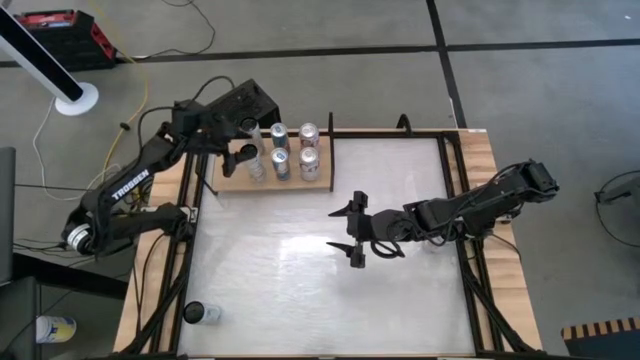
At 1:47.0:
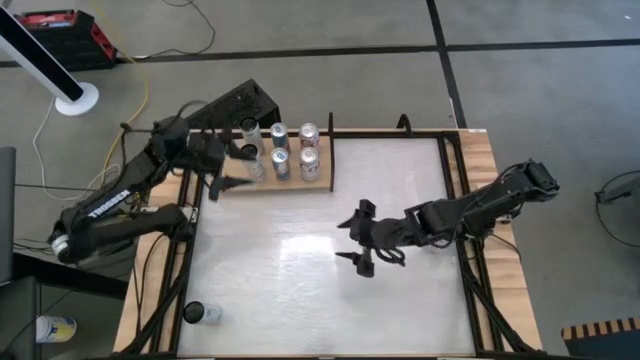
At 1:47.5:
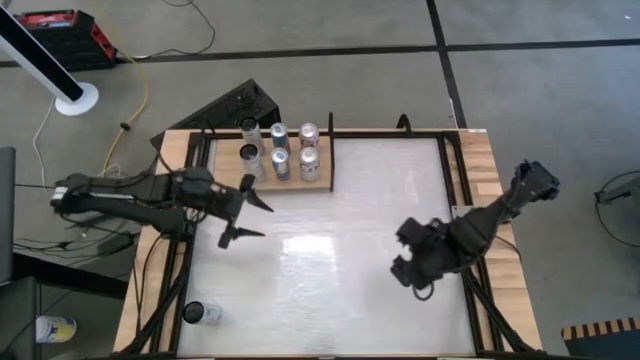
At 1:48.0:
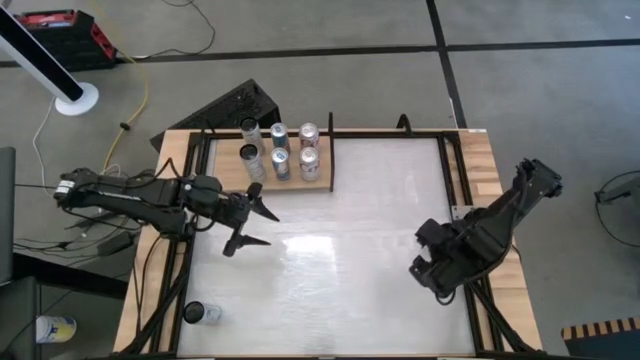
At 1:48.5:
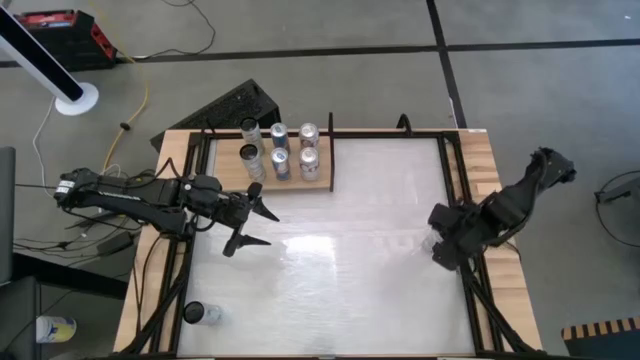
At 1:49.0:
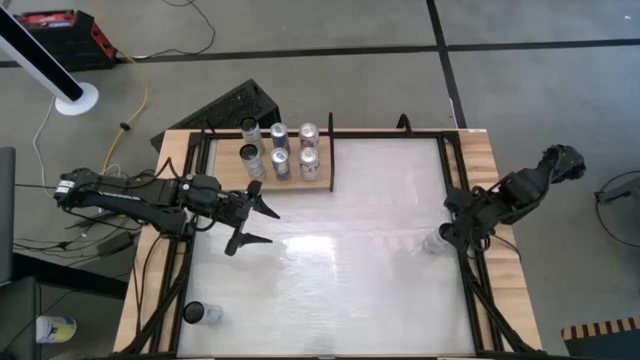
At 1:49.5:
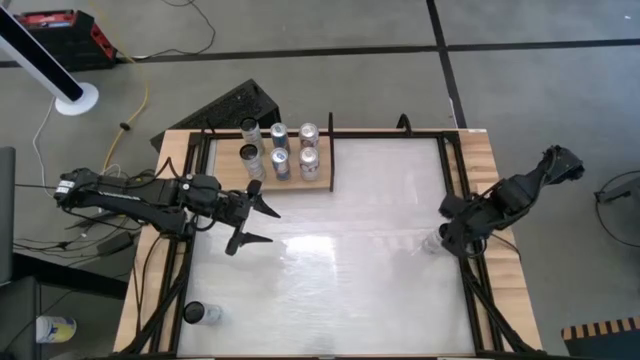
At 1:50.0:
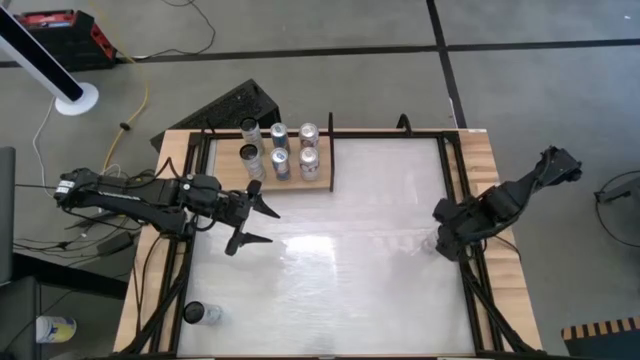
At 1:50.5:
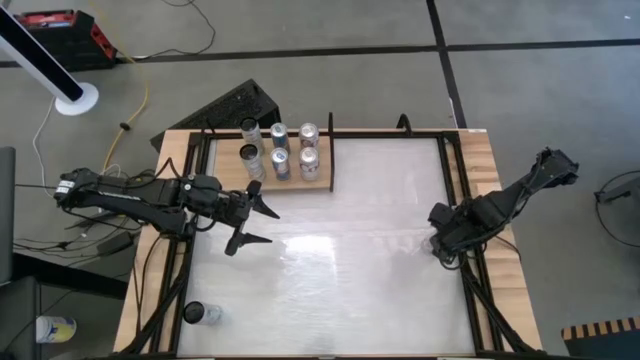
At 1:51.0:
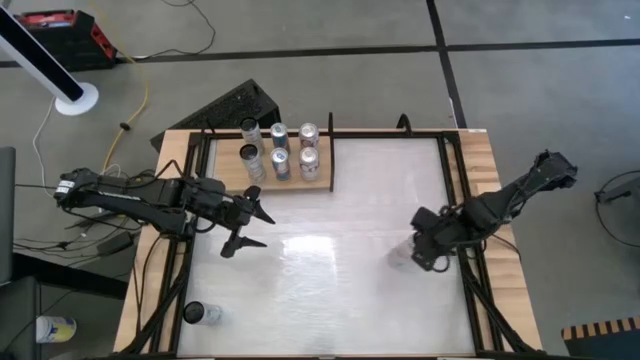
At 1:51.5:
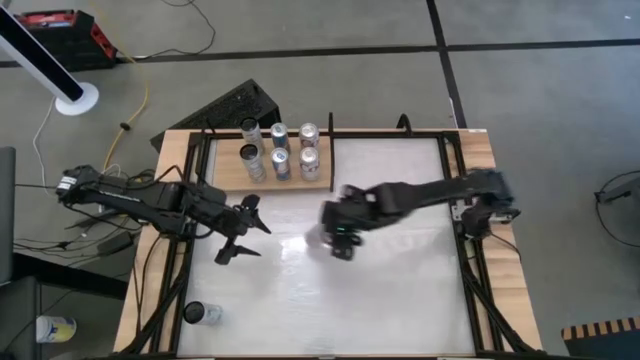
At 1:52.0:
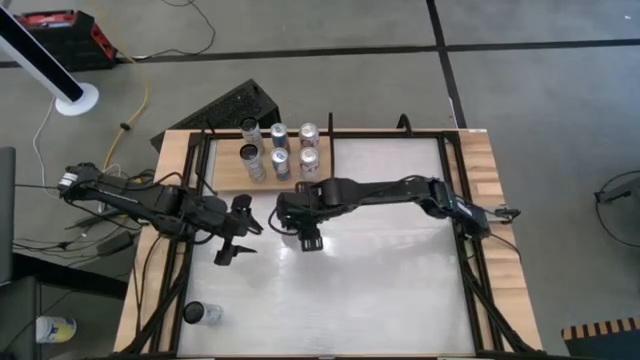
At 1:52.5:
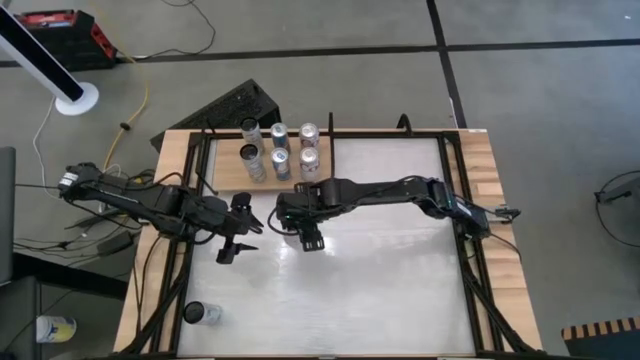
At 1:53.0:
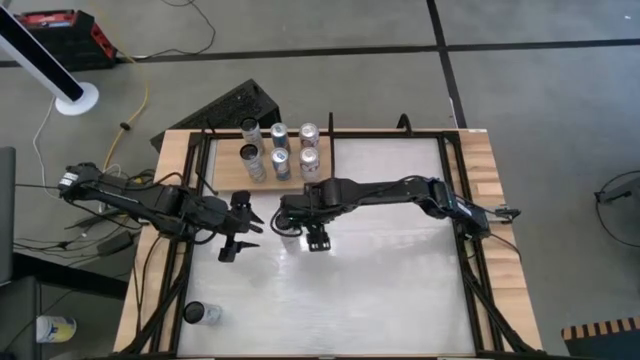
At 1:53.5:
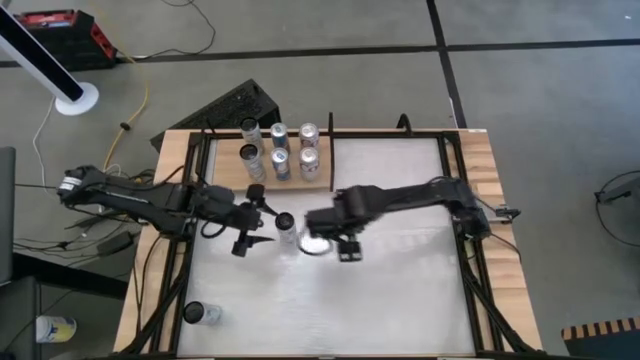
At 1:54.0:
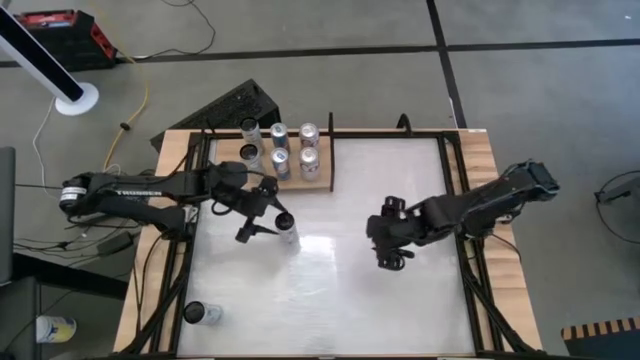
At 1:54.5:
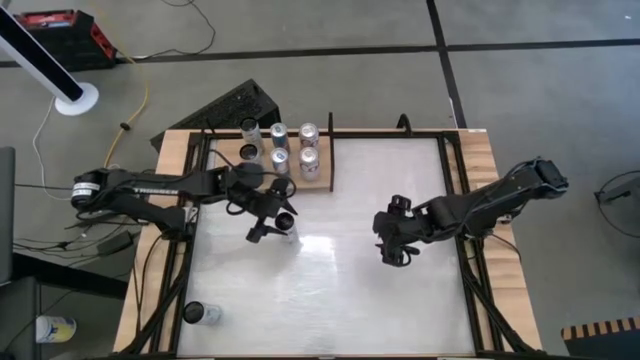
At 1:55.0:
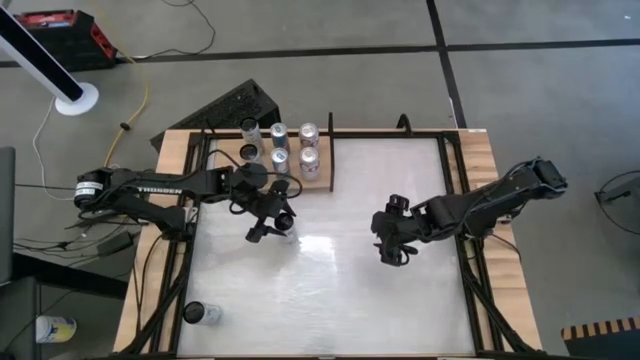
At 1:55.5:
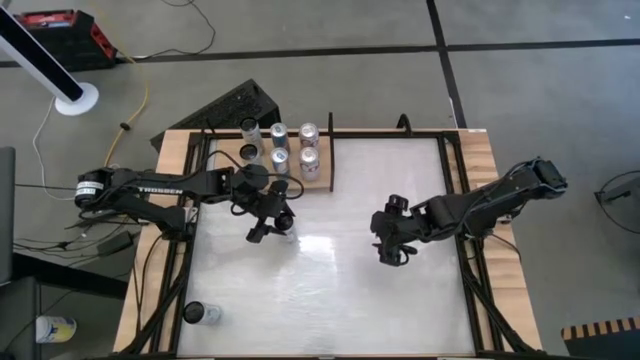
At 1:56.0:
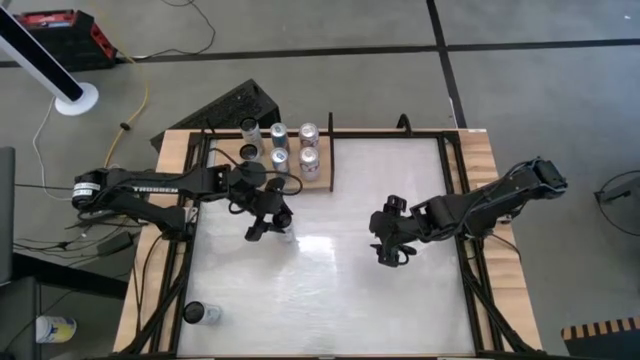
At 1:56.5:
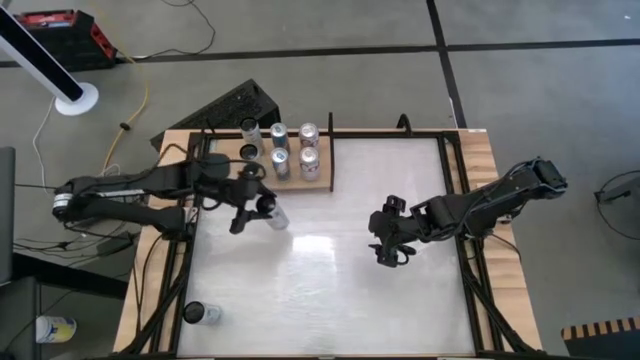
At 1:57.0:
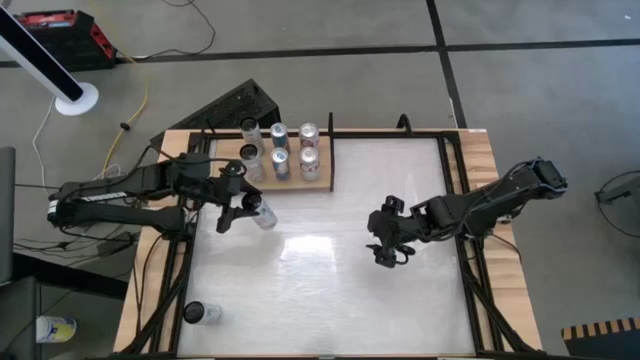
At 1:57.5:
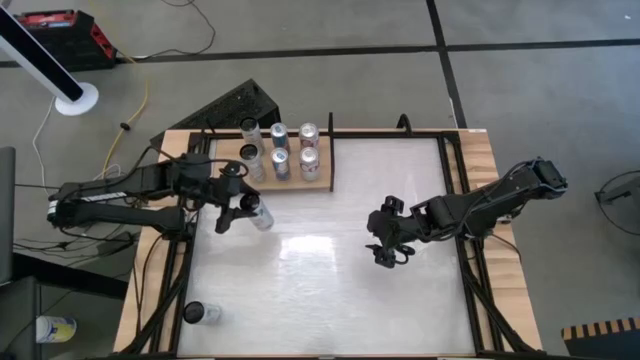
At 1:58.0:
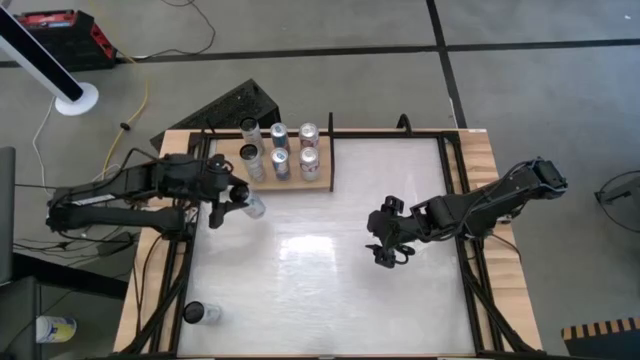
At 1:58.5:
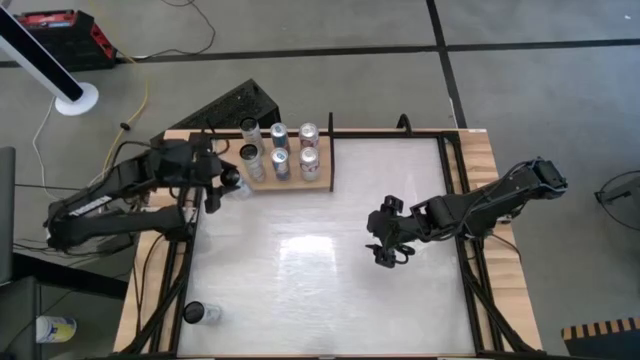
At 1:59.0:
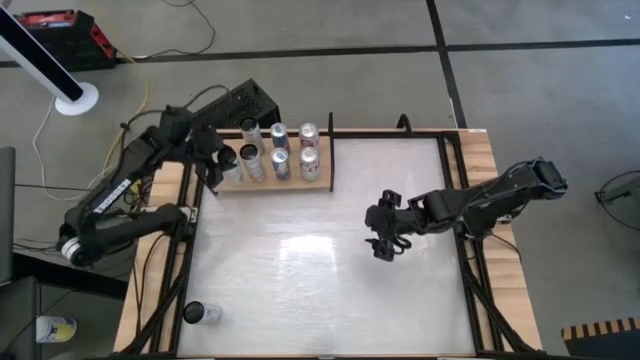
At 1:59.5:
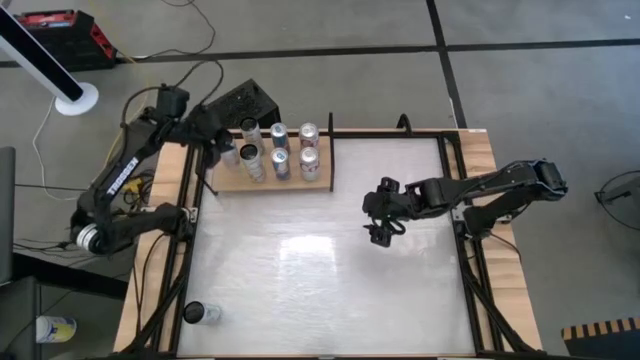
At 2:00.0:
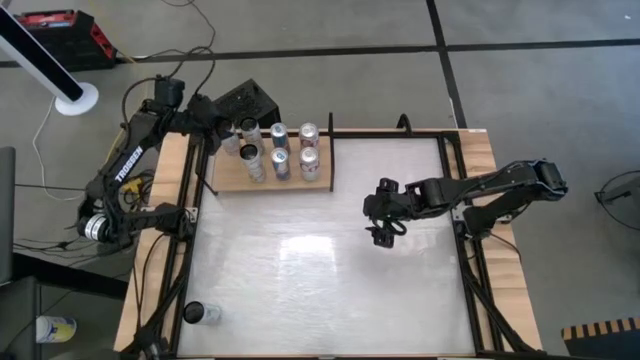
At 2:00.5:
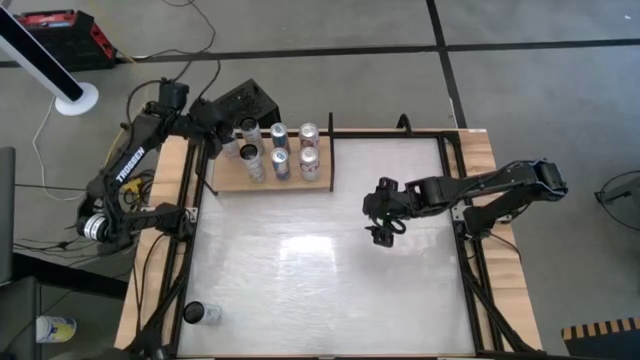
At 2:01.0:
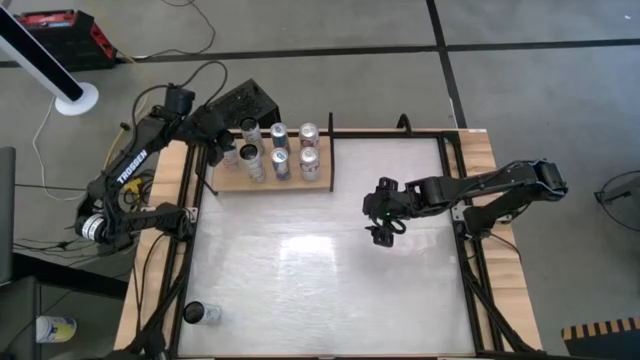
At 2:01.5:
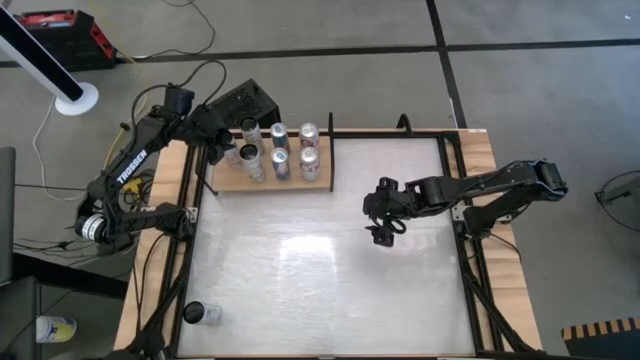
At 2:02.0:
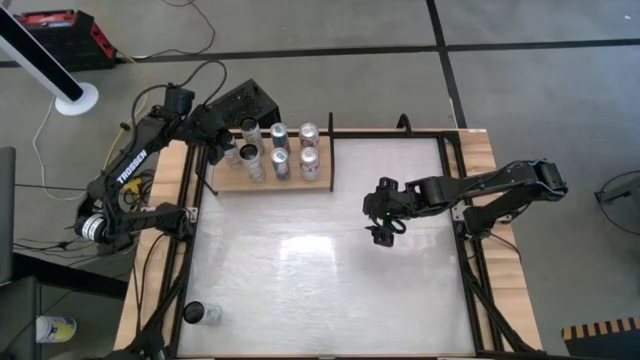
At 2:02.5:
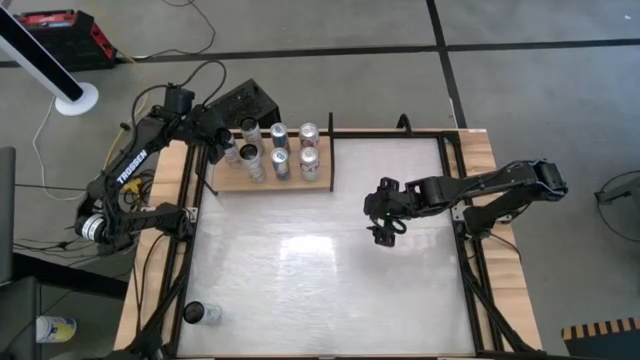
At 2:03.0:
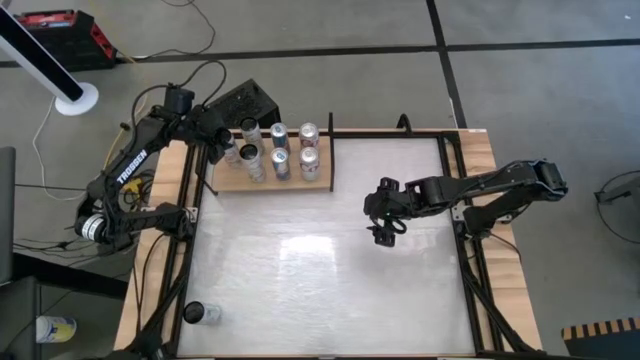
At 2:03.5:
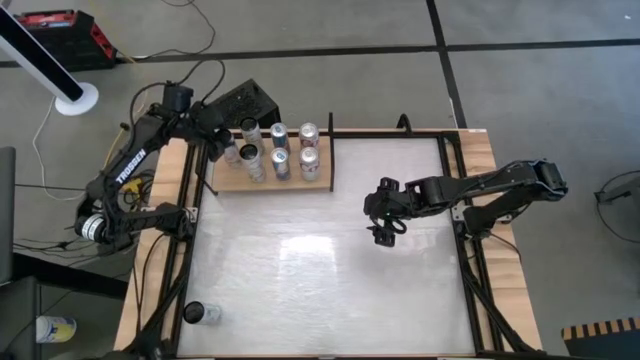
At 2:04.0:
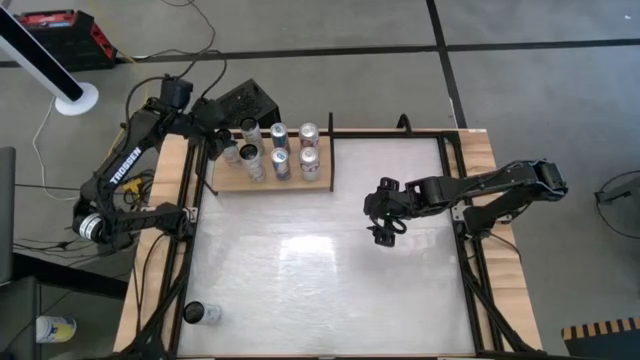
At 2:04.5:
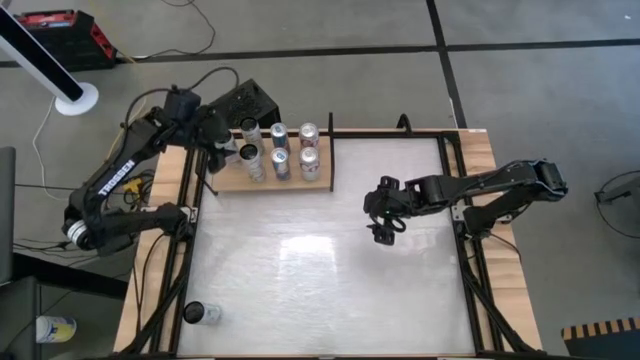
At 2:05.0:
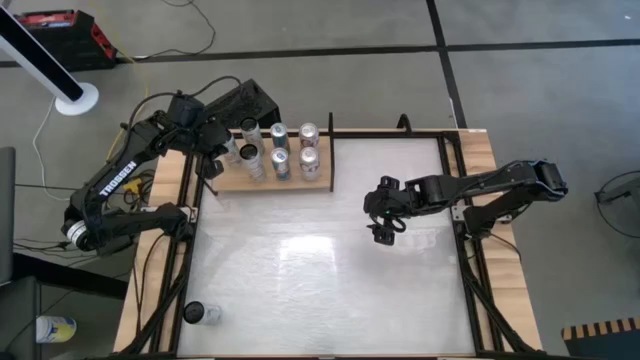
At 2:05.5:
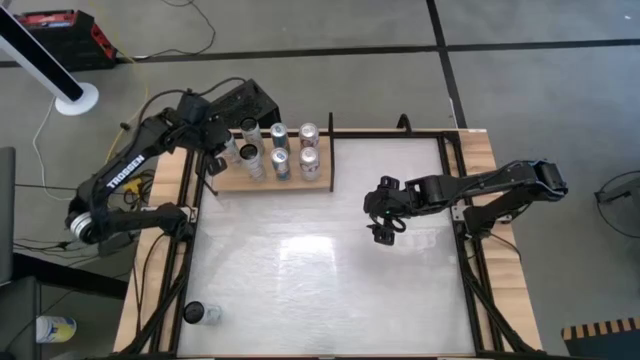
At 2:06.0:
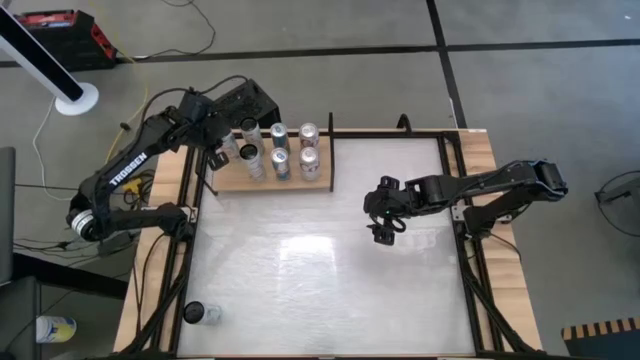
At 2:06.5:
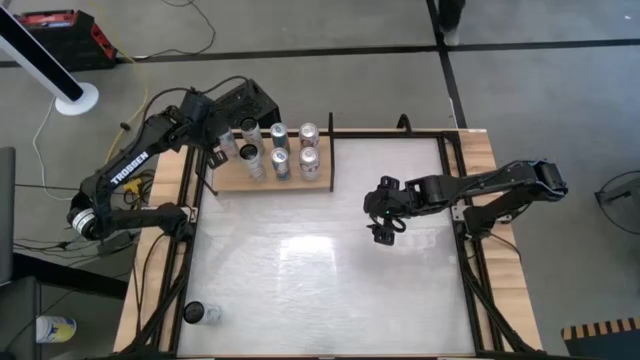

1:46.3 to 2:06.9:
Task: Place canned beverage on shelf
Put the right red soda can on the shelf
